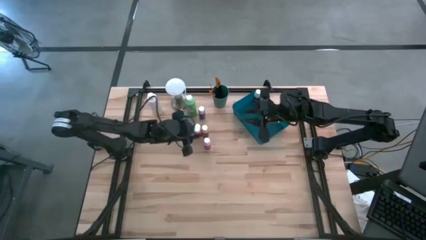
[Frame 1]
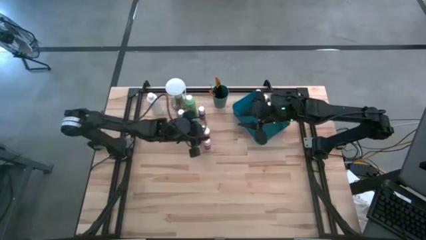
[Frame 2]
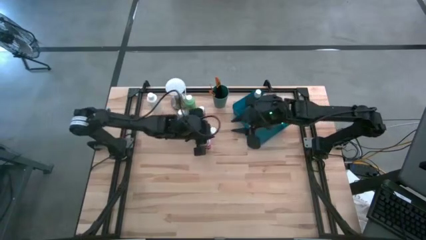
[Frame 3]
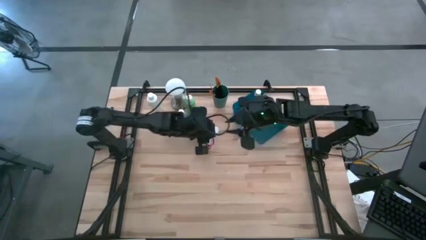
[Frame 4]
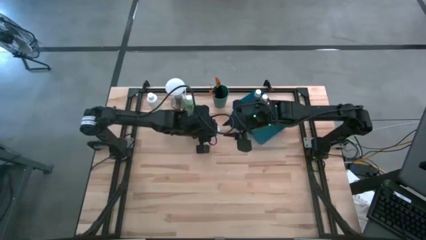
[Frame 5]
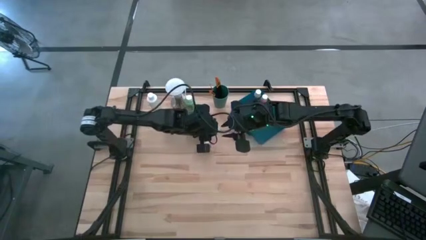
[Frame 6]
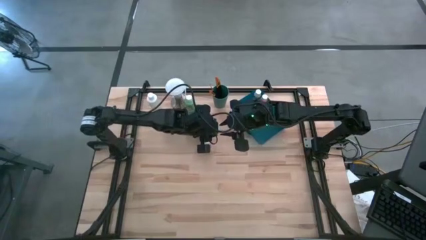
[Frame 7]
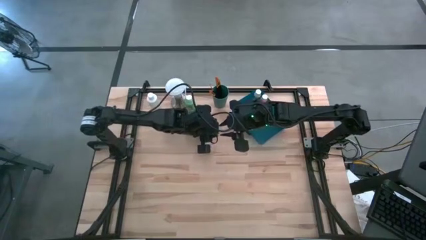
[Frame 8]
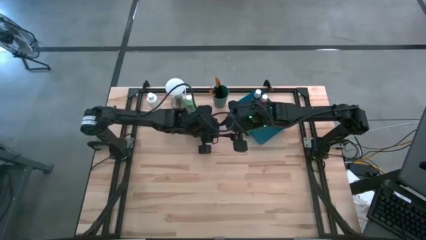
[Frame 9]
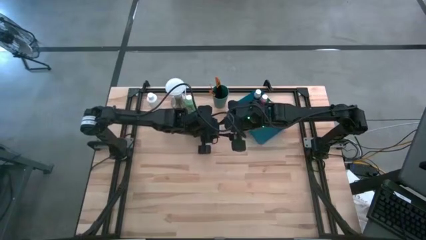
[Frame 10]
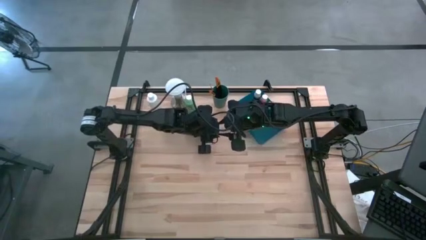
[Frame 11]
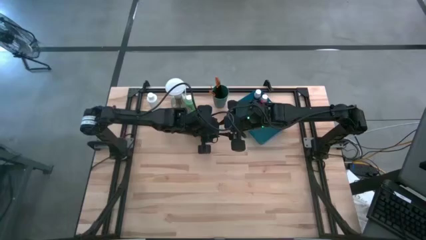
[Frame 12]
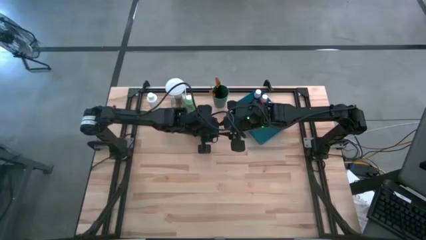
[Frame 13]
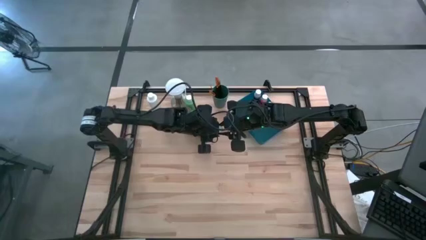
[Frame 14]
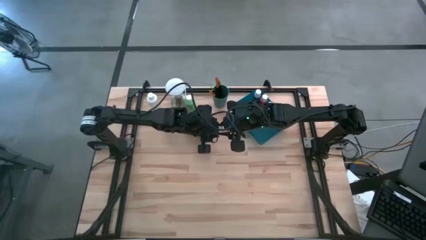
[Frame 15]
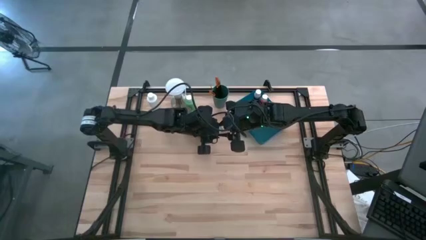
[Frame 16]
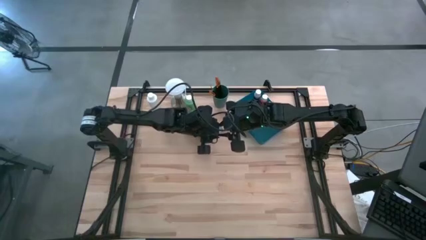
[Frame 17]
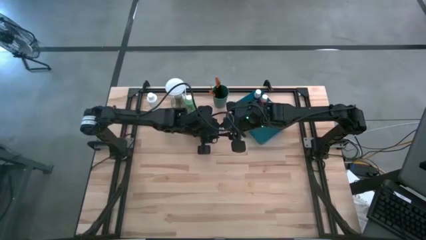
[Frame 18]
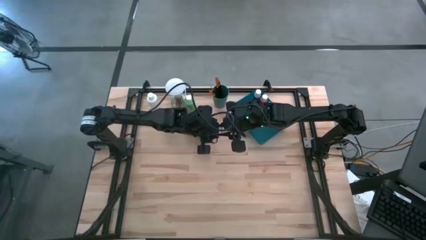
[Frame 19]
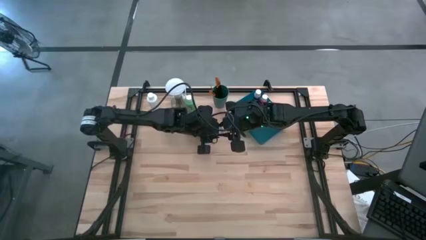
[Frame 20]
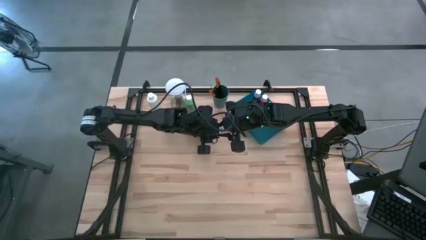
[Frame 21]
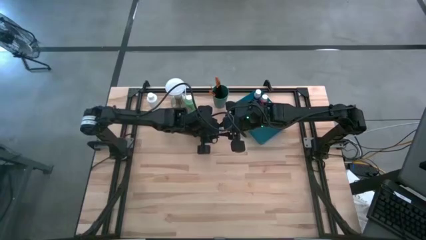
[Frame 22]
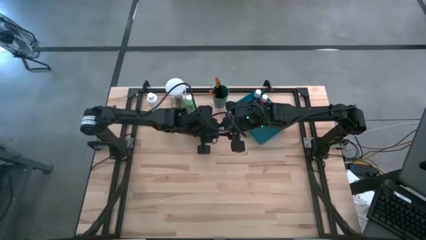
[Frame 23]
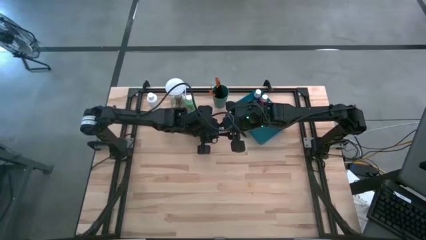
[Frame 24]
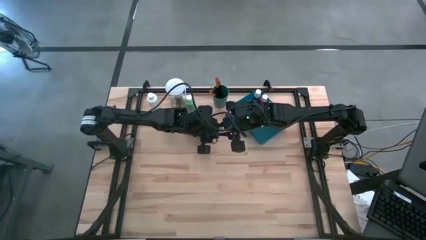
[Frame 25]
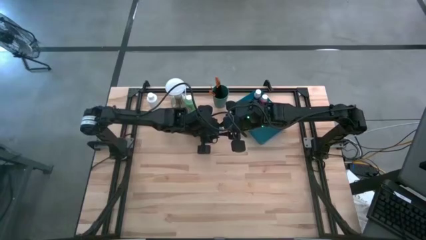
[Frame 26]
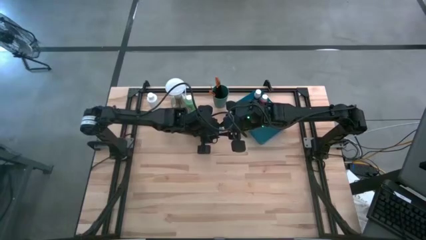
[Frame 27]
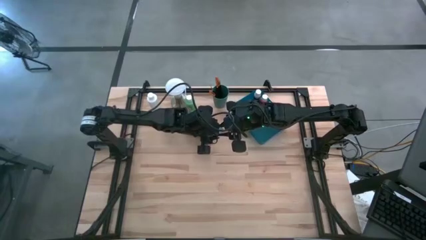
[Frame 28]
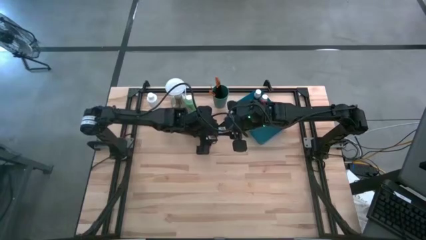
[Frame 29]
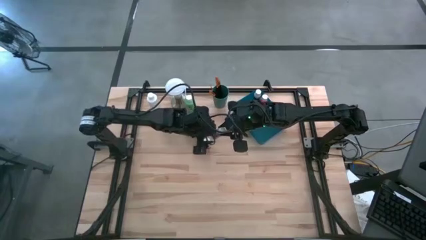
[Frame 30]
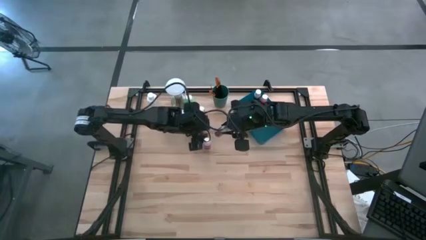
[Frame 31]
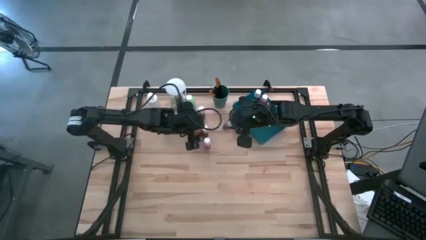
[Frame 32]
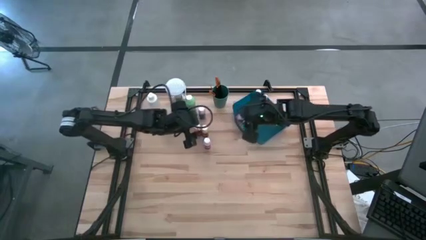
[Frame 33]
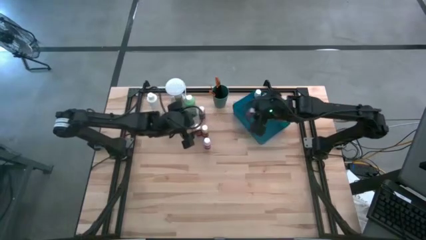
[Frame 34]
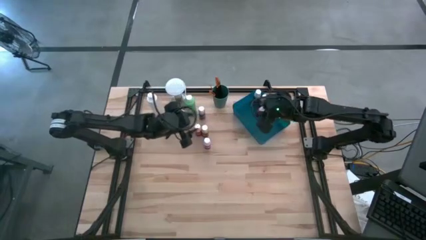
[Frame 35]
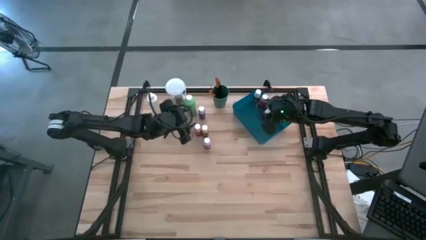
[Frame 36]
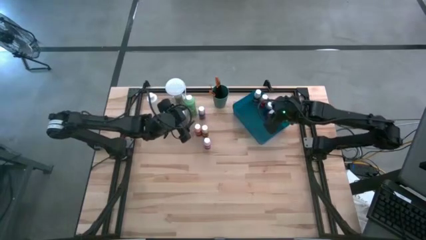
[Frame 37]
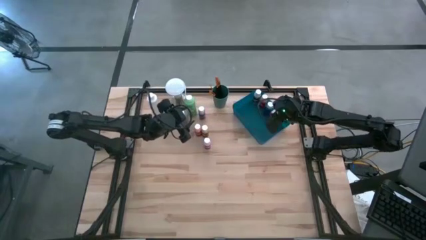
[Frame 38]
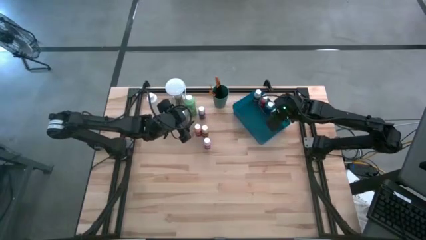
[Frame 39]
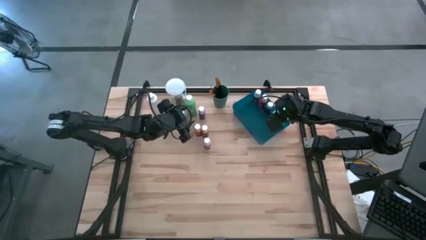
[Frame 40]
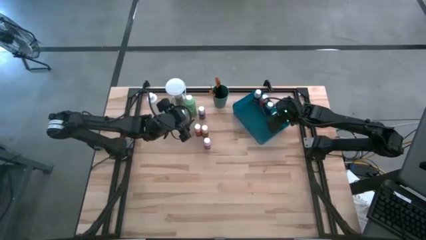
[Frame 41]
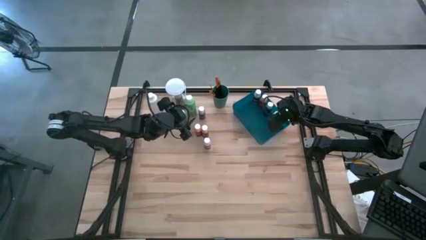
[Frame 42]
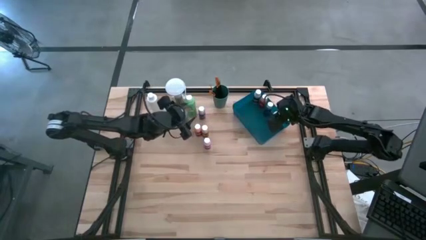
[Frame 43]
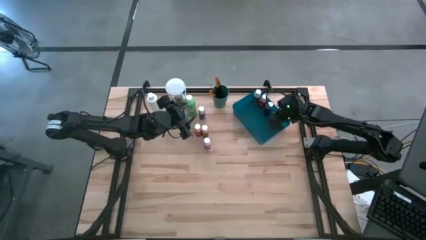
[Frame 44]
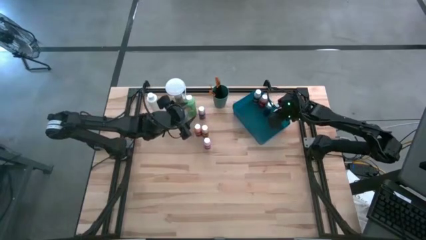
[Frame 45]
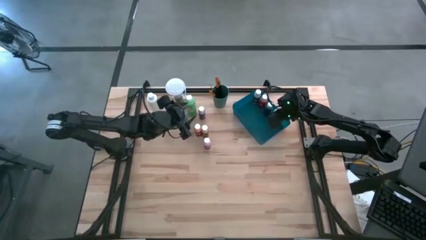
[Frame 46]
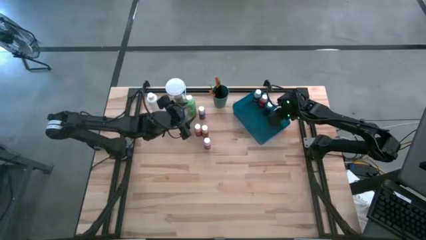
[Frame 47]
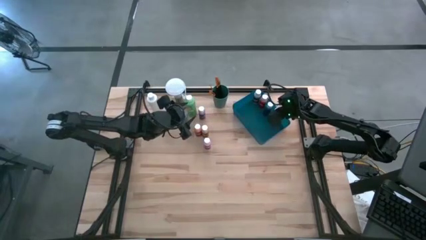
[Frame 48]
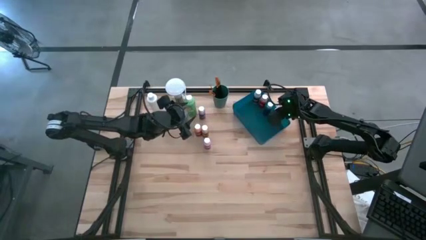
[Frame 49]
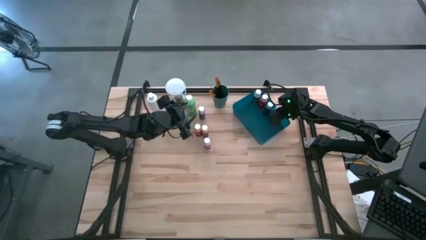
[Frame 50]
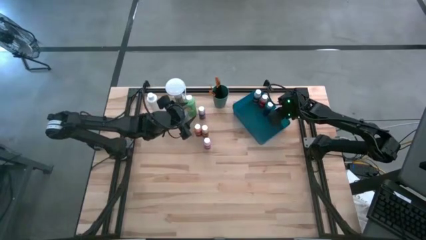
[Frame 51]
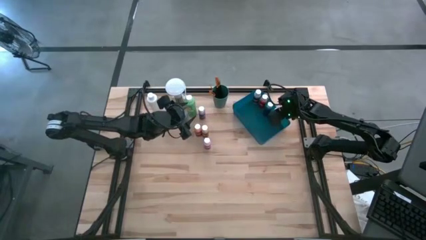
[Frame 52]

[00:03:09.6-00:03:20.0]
Task: Pick & Place Paint Supplies
Put the red paint bottle into the blue bin
